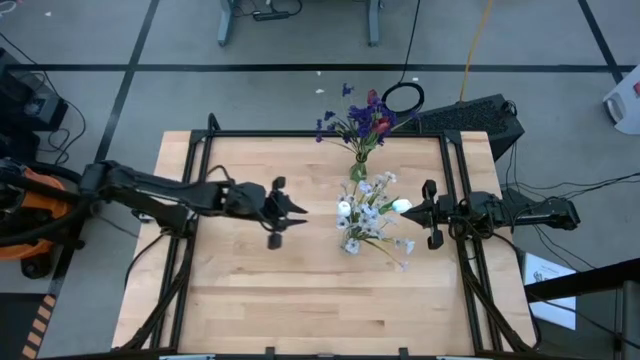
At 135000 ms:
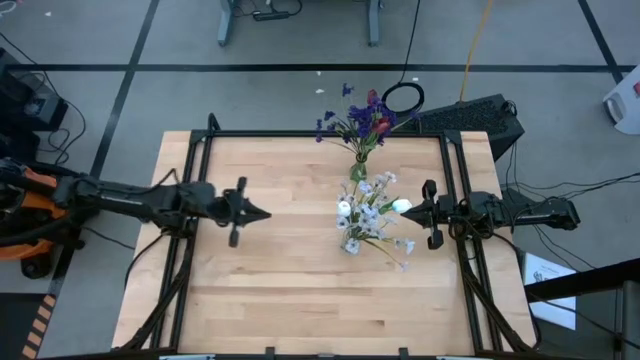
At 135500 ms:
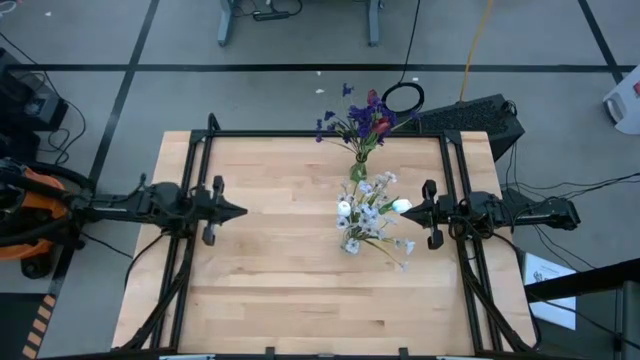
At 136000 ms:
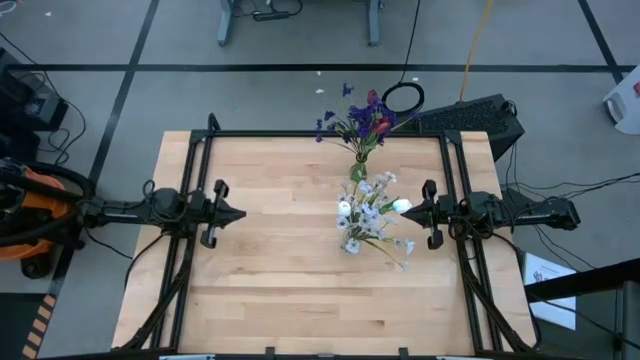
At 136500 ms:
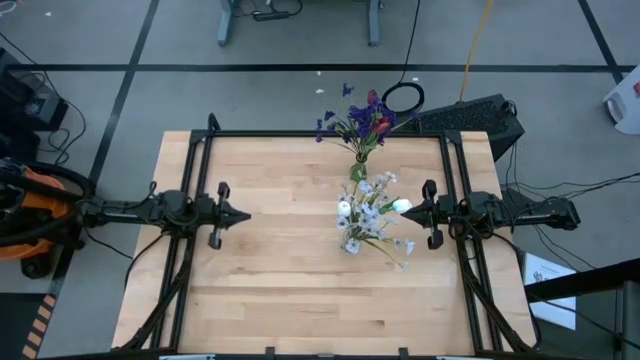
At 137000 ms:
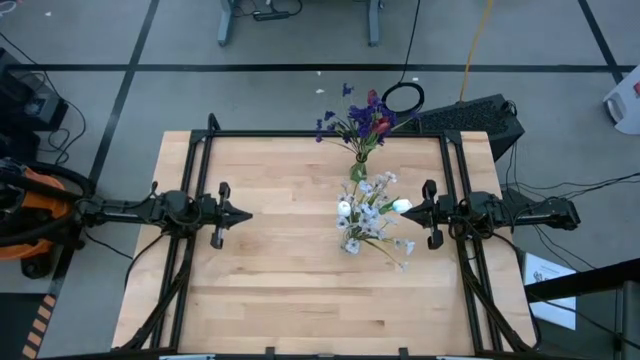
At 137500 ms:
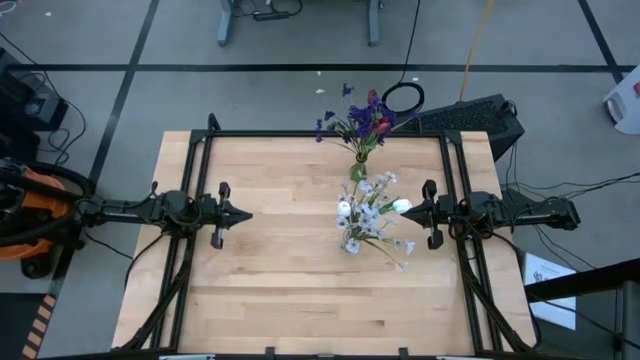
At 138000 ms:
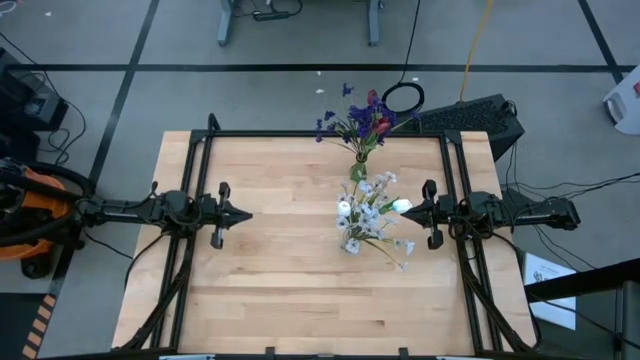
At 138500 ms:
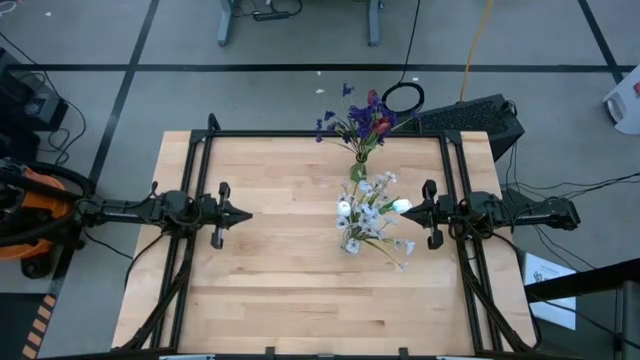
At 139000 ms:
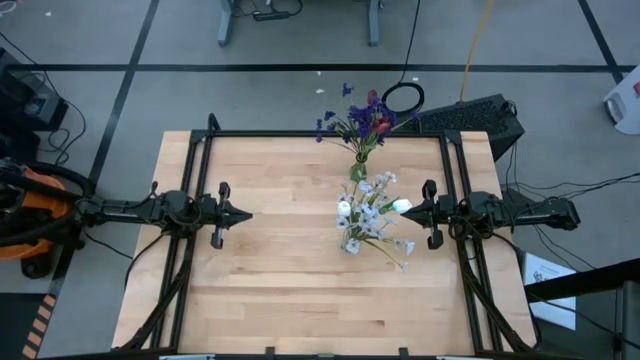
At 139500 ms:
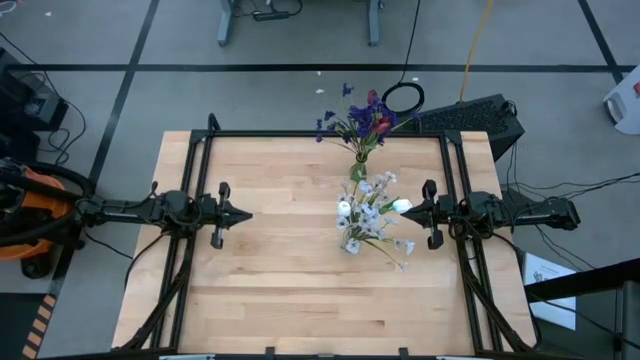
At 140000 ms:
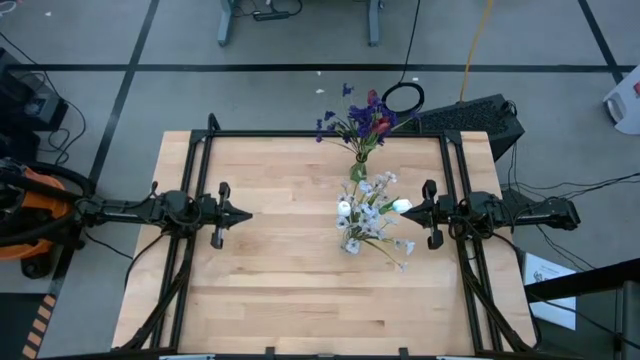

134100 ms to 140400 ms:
Task: Sort flowers into vase by color
Return to Home Position

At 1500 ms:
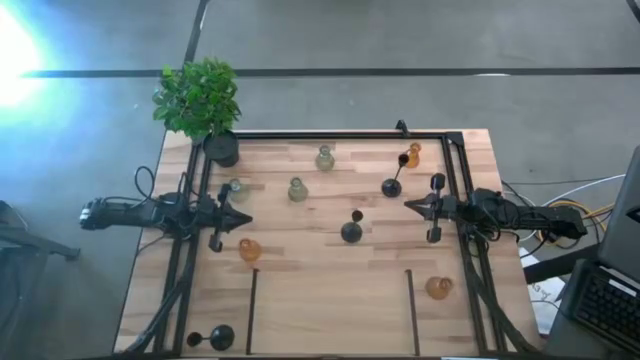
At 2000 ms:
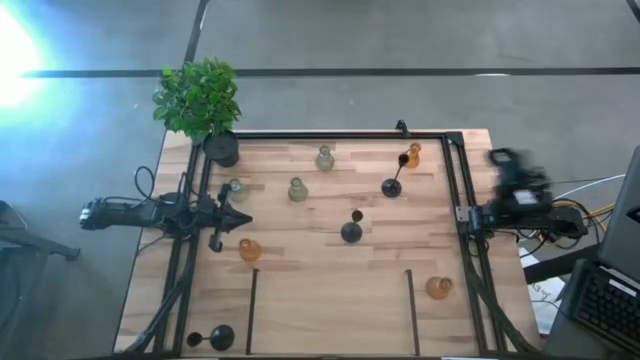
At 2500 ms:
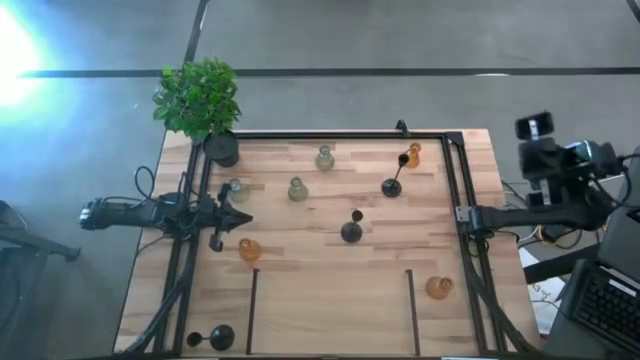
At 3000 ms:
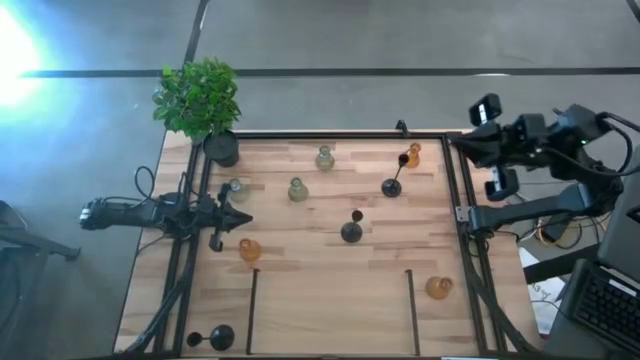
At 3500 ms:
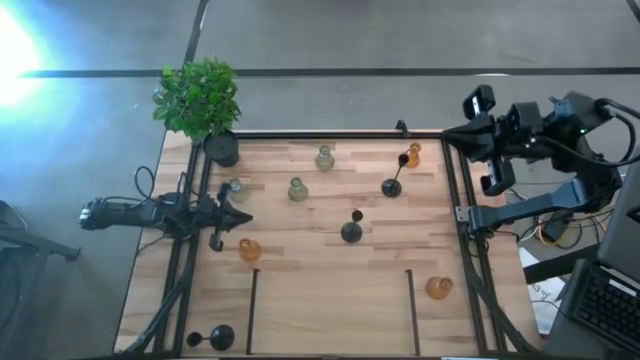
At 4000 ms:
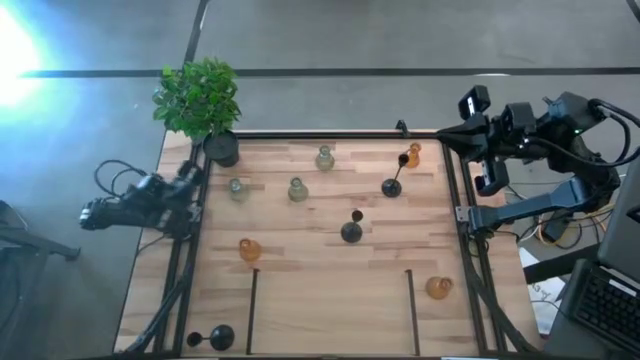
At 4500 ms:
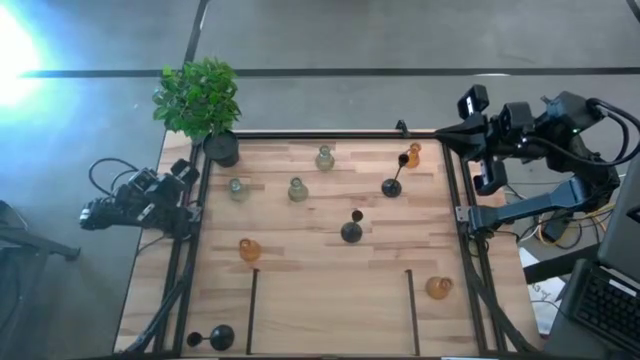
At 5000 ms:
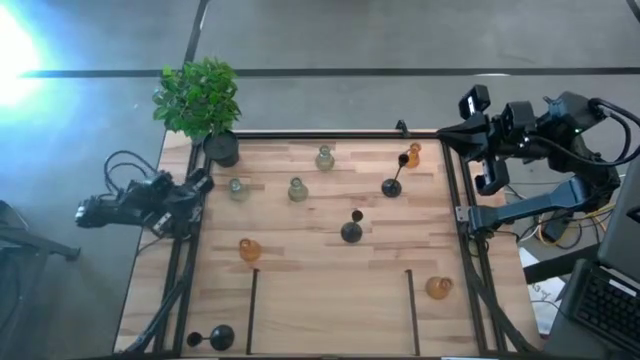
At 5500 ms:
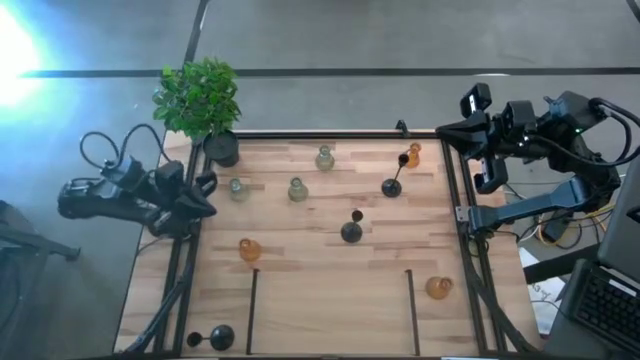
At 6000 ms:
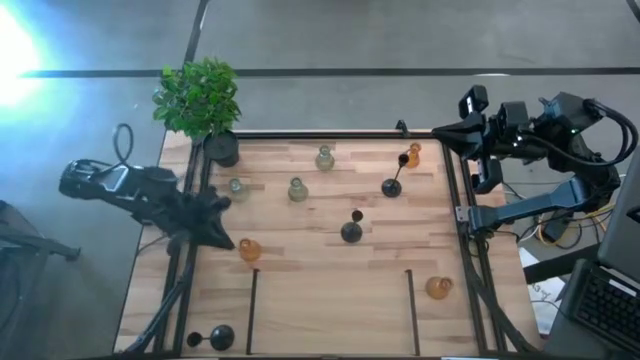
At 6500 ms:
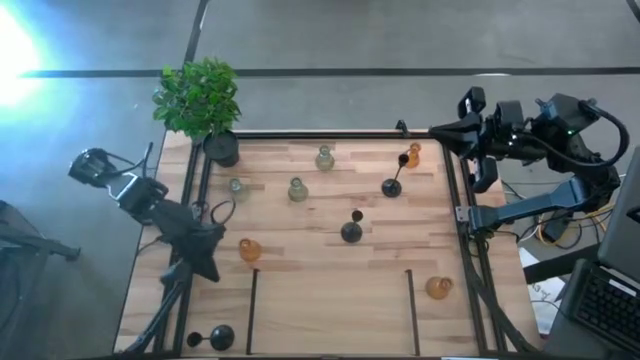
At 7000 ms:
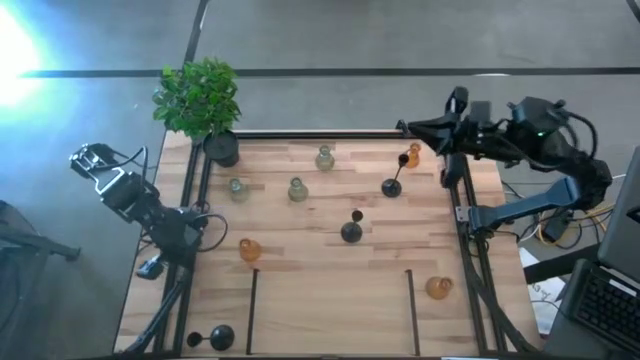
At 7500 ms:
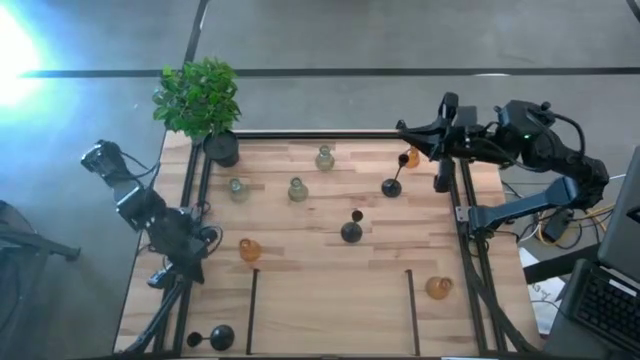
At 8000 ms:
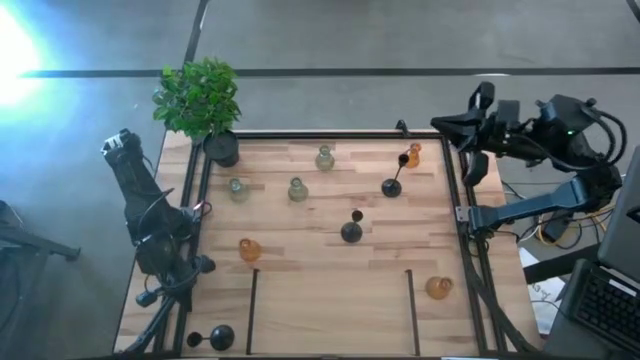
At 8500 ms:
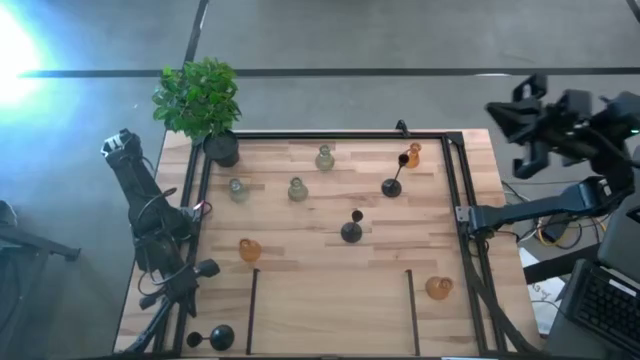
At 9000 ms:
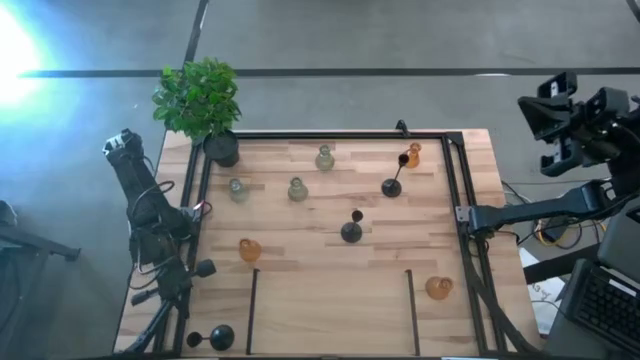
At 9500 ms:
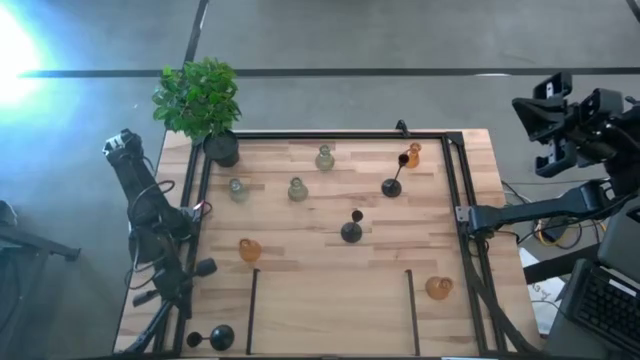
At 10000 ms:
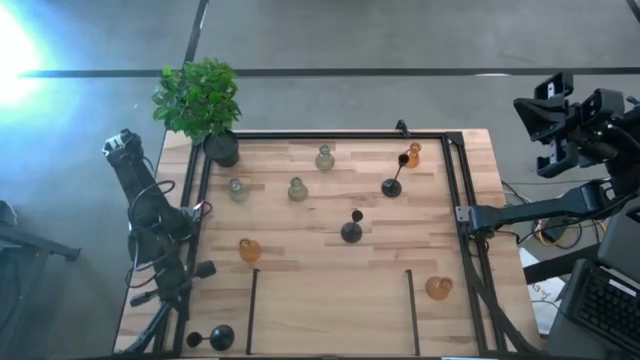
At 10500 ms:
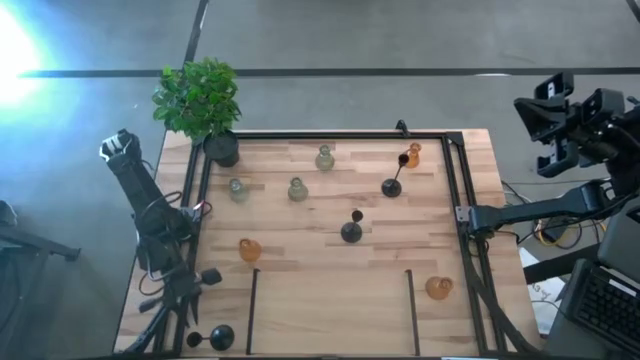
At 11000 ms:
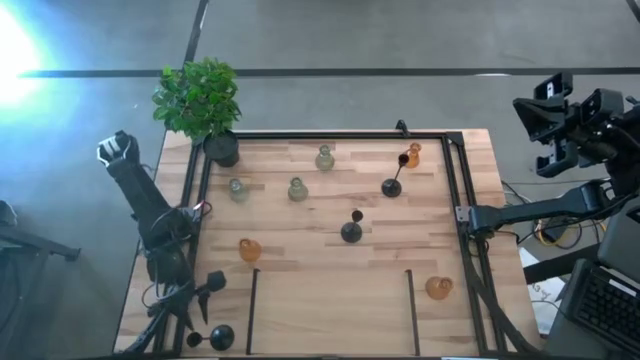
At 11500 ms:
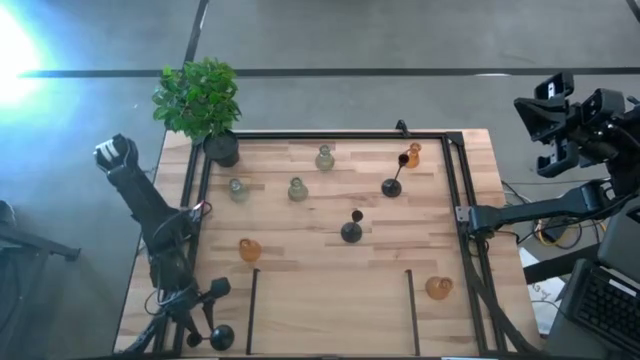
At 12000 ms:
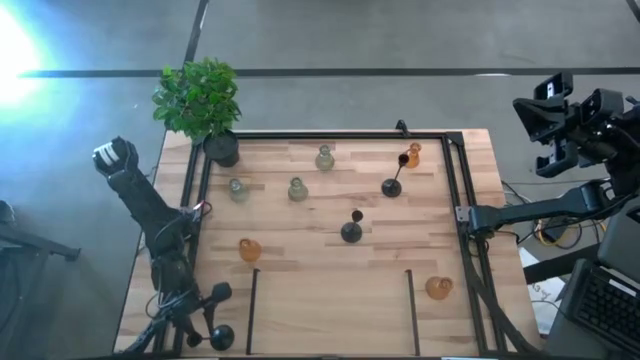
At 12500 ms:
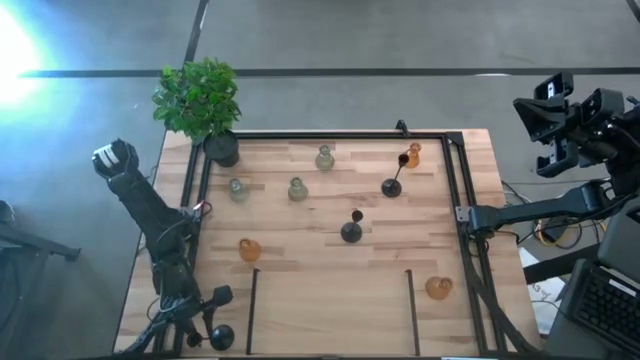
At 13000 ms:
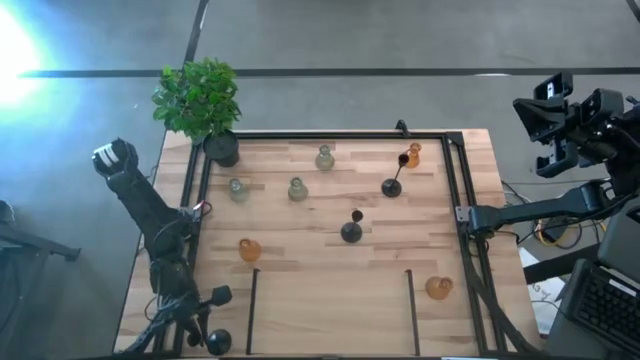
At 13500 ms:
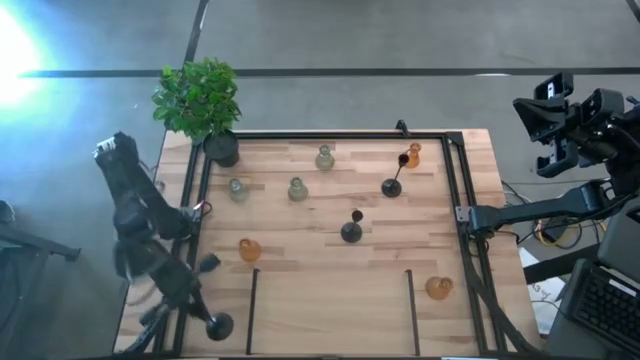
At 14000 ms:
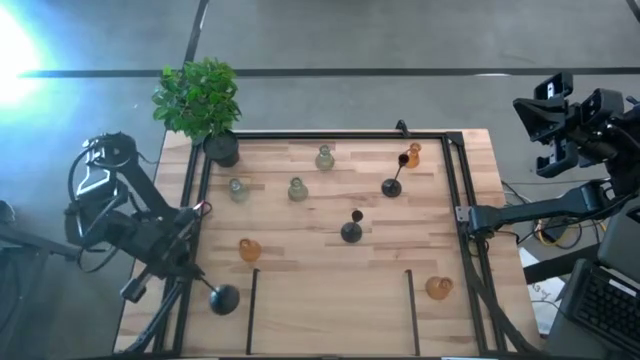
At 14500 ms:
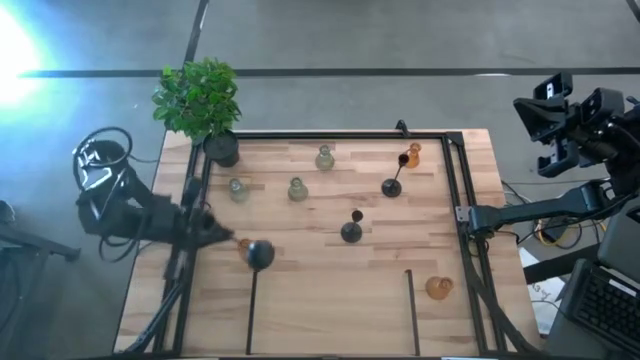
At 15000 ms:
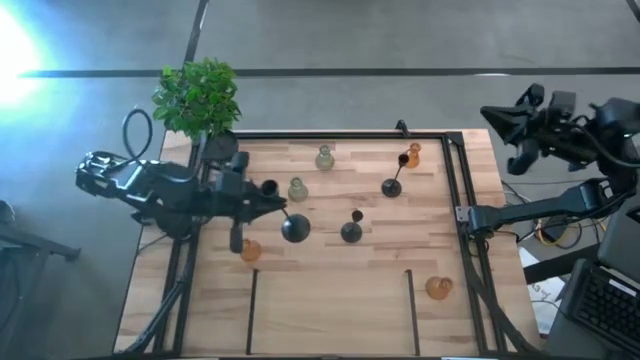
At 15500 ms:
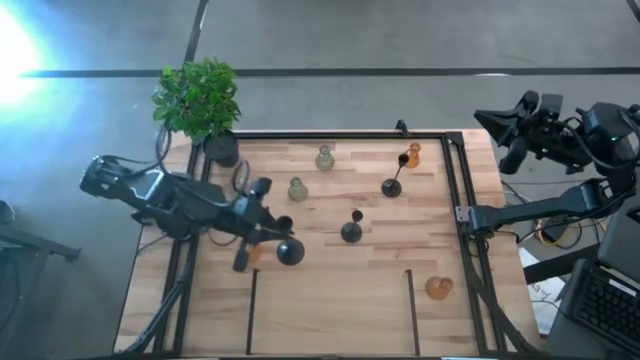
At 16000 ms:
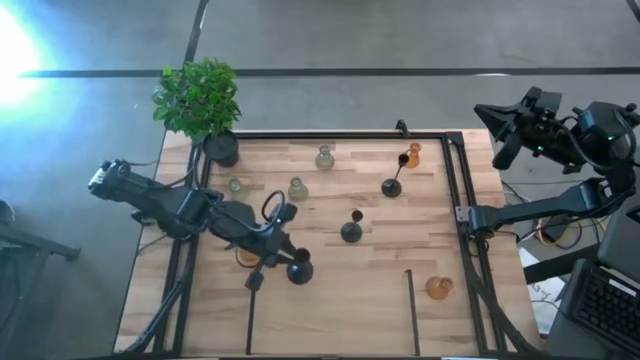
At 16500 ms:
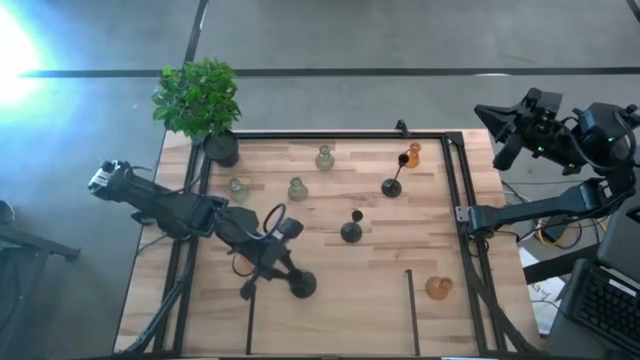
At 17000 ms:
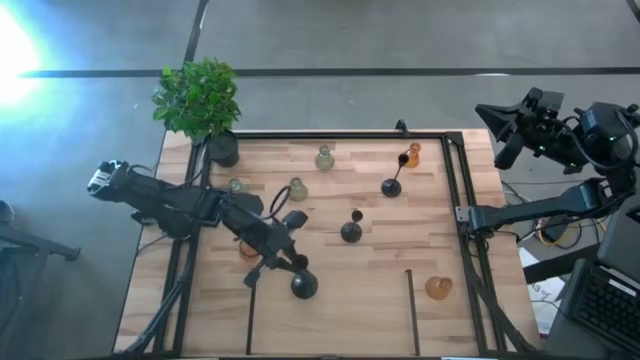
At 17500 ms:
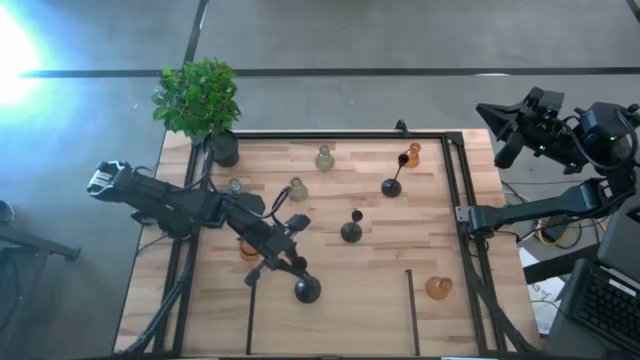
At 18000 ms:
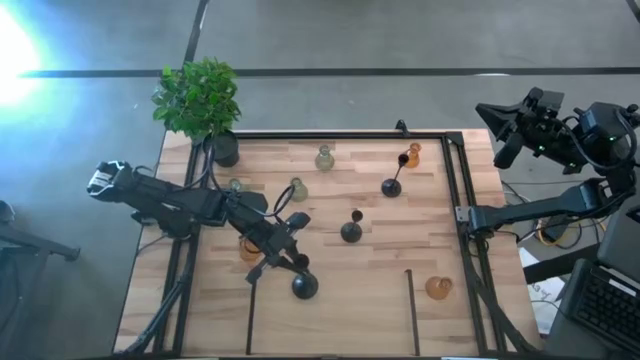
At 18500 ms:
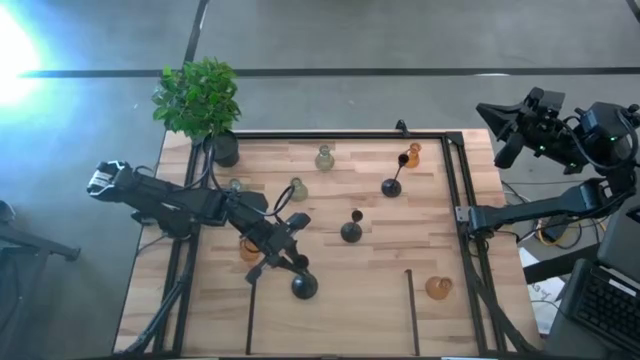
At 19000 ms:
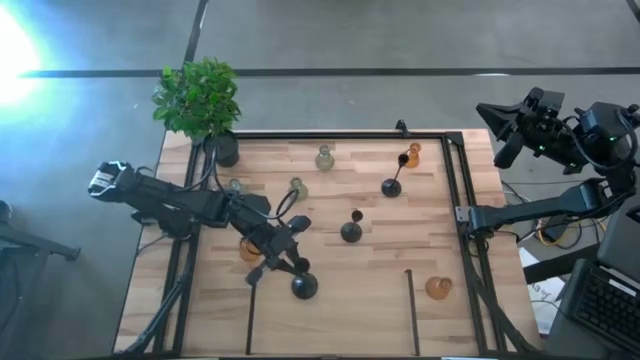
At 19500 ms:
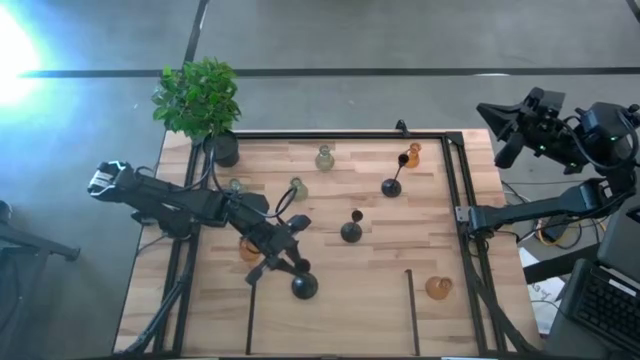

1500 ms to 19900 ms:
Task: Pick & Place candle stick holders
Put the bottom black candle holder on the shelf
